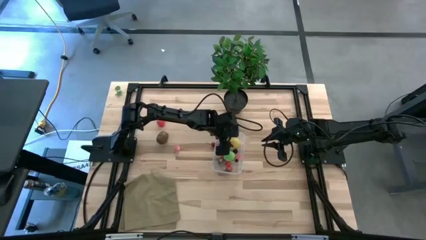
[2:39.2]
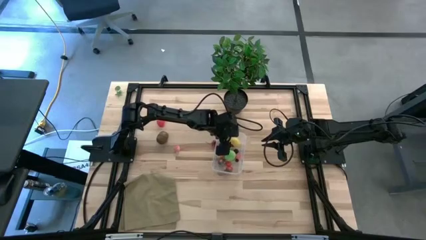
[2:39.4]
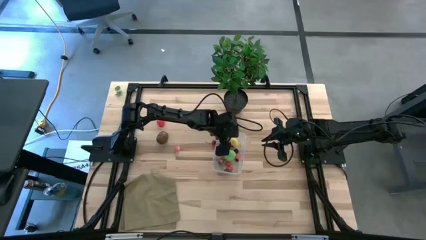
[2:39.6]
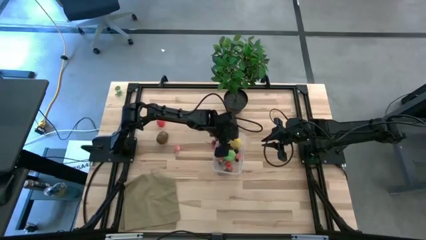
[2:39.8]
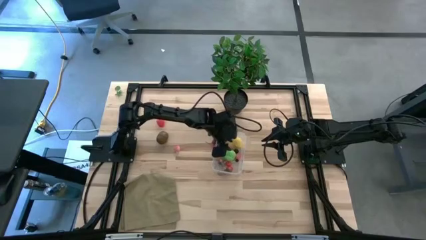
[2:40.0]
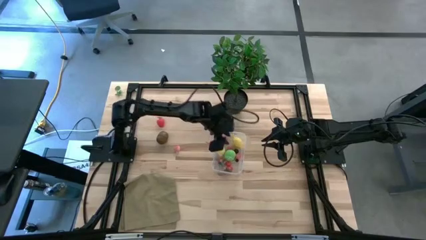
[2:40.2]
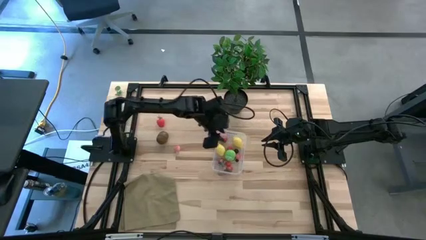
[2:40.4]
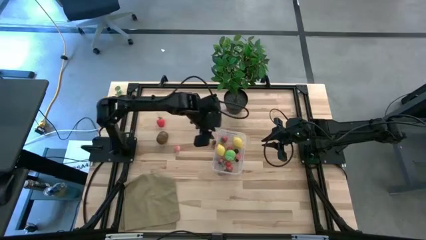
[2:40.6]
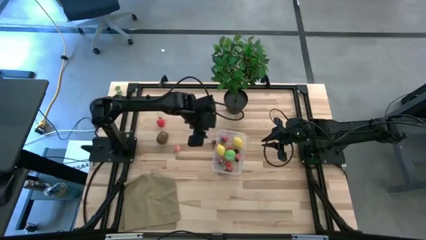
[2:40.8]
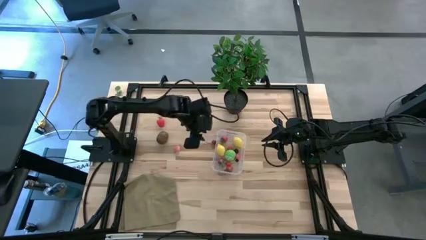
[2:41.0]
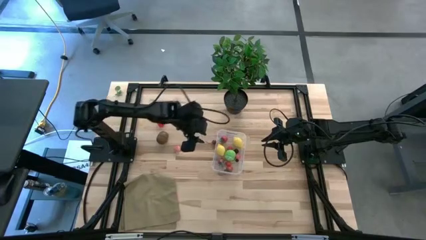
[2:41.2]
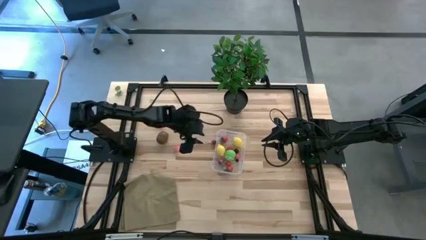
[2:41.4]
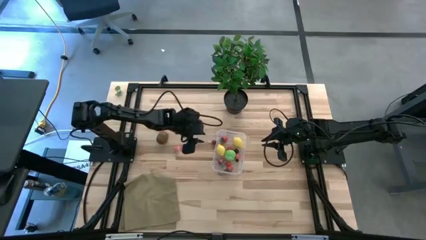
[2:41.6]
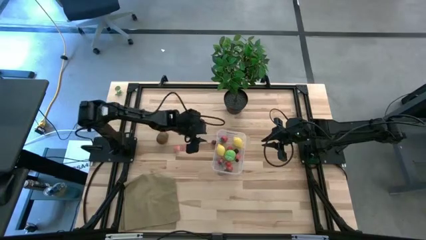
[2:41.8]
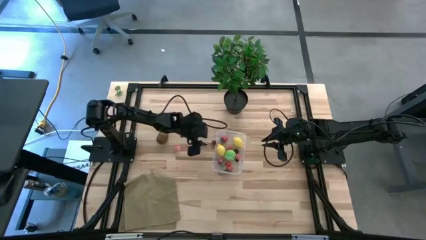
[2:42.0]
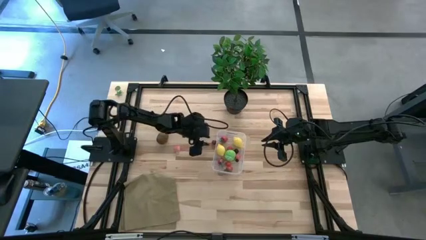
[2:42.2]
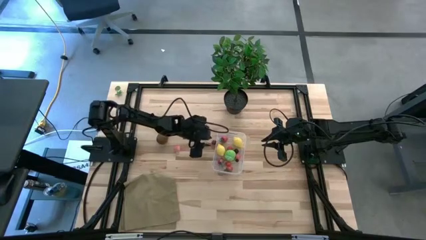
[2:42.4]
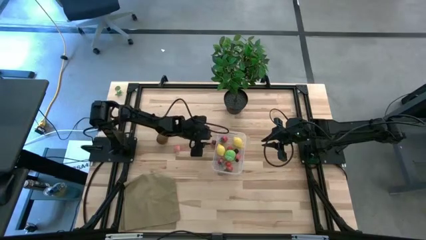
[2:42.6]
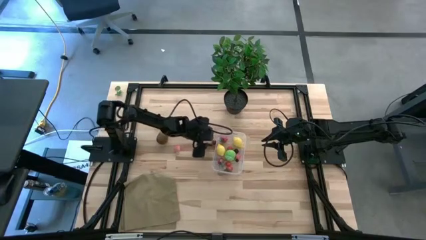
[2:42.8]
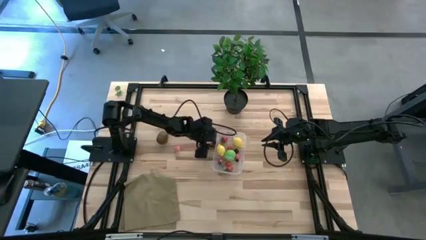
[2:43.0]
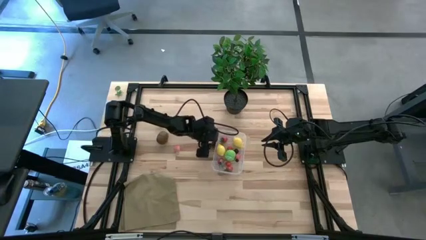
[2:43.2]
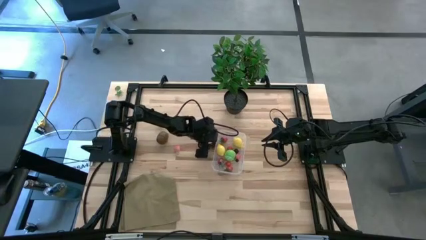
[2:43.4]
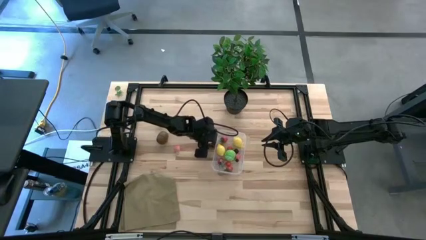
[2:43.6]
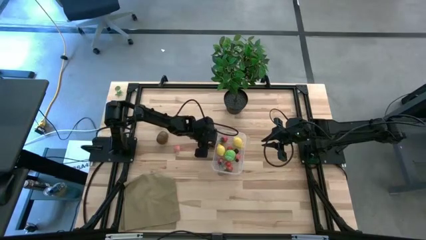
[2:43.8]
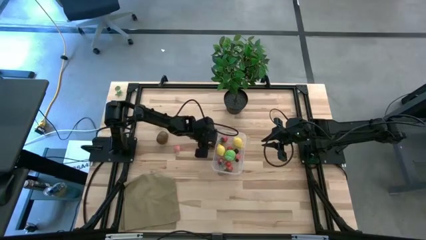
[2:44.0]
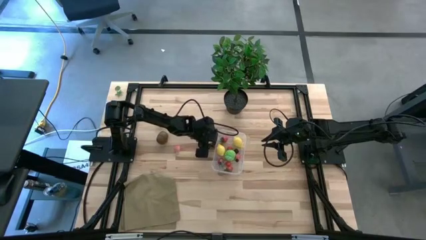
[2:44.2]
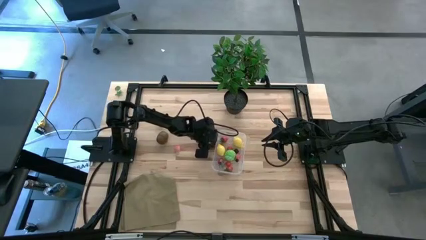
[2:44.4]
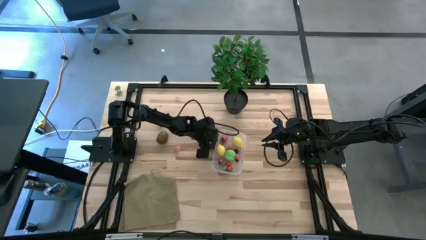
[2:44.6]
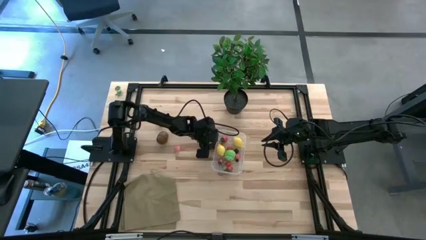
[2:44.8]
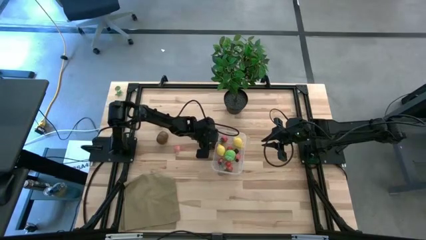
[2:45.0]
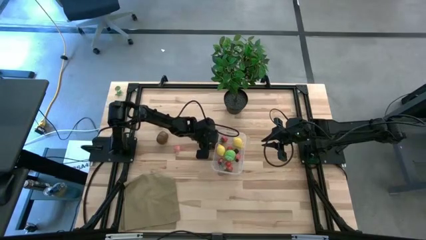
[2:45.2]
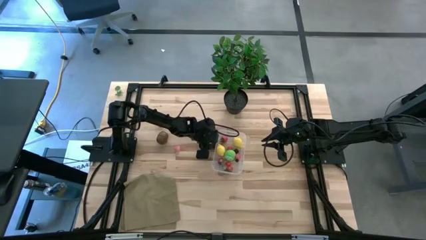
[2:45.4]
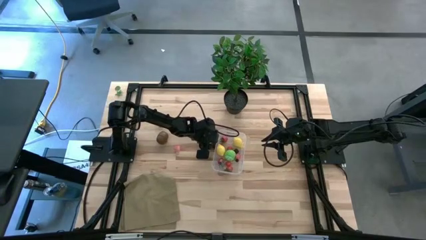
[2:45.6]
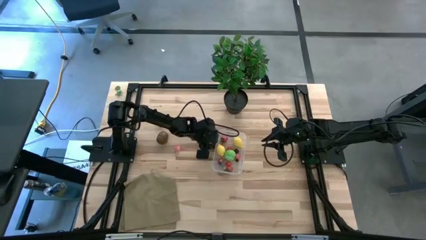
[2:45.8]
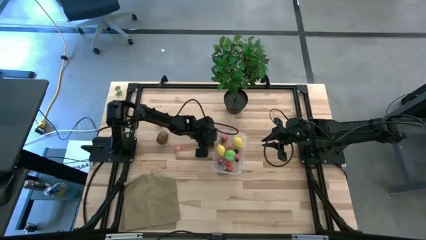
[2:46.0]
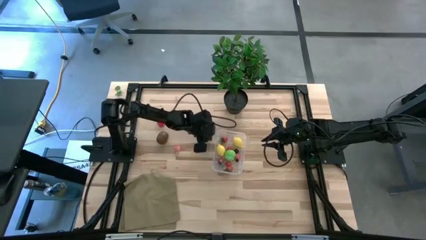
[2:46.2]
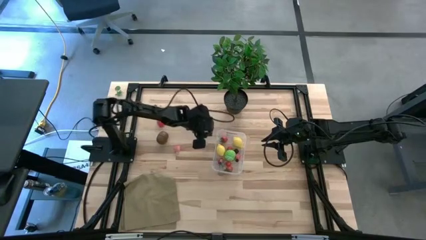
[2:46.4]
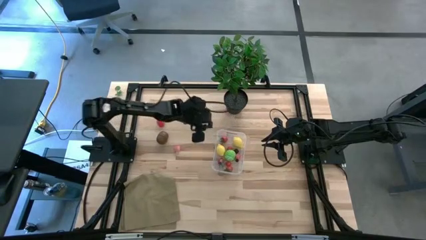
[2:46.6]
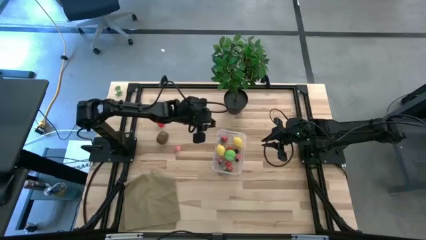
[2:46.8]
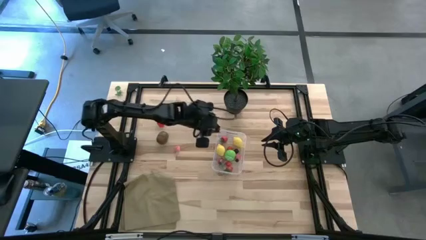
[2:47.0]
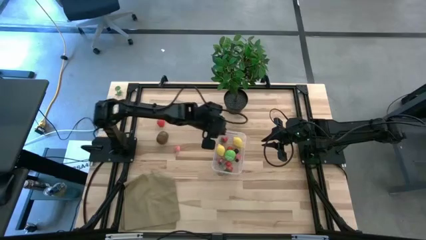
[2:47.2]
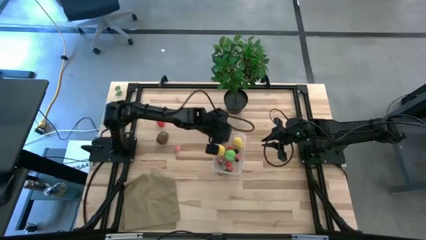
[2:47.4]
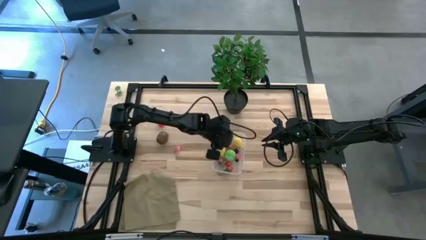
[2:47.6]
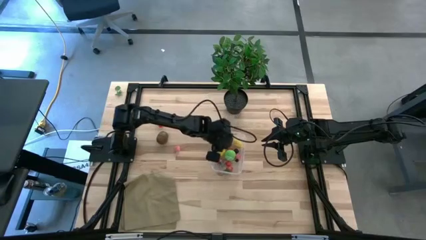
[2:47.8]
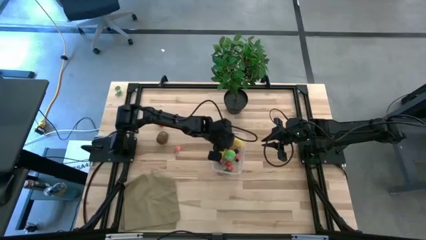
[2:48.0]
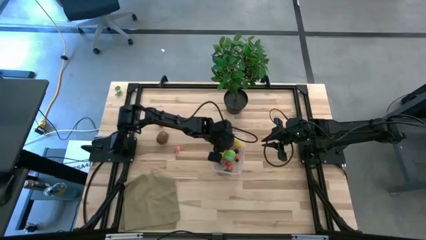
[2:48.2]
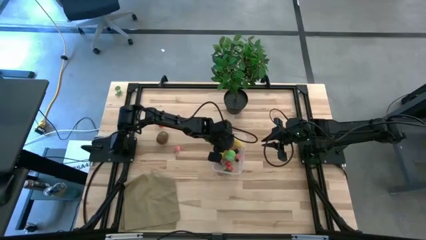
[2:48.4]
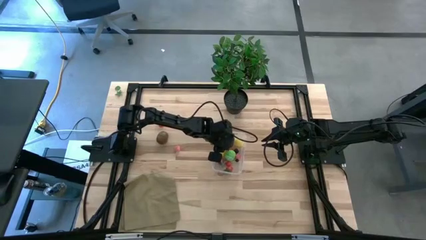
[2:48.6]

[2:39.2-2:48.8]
Task: Pick and placing Produce into tupperware
Put the red cherry into the transparent container

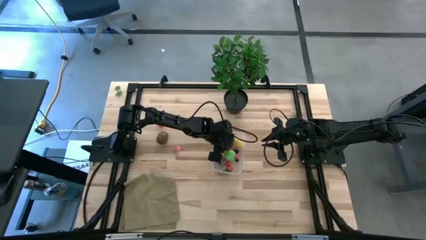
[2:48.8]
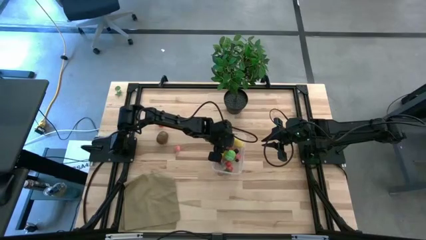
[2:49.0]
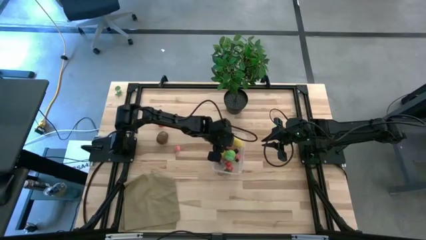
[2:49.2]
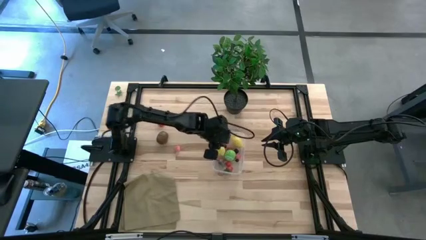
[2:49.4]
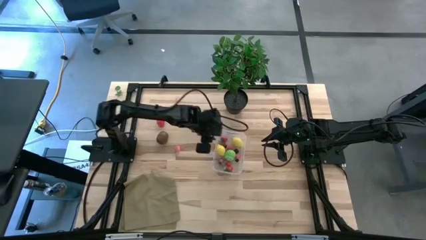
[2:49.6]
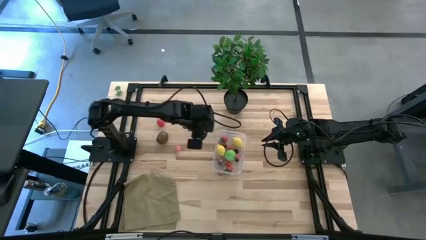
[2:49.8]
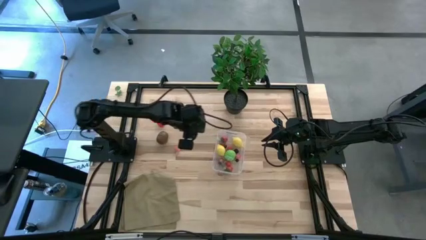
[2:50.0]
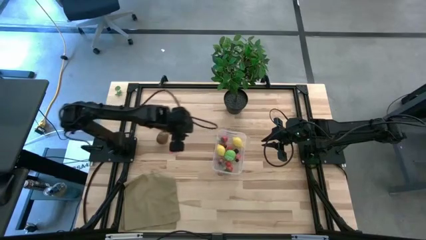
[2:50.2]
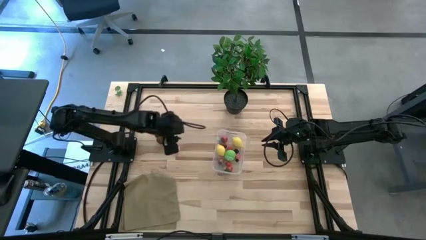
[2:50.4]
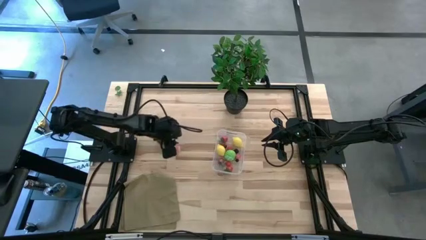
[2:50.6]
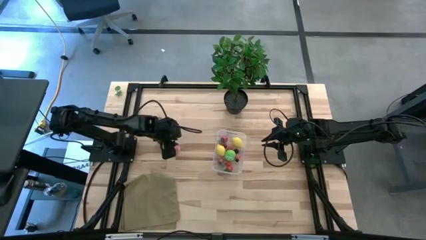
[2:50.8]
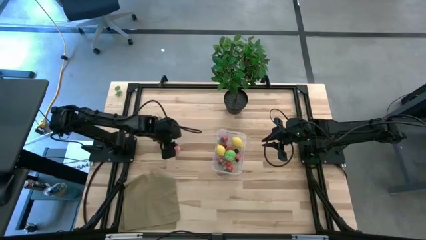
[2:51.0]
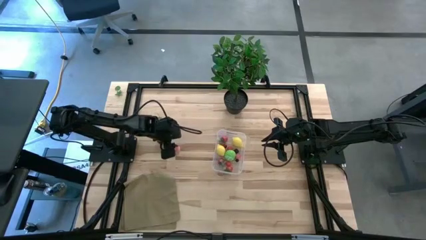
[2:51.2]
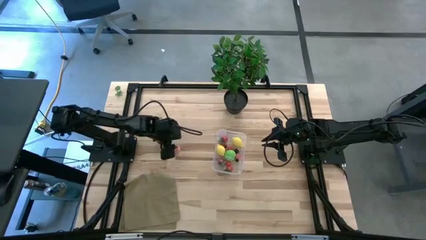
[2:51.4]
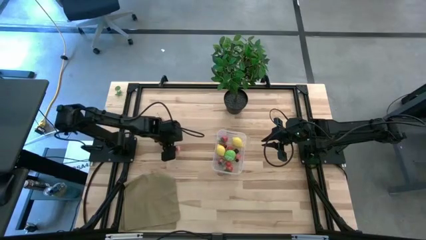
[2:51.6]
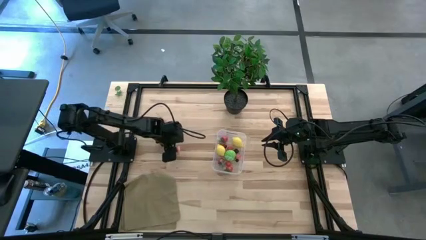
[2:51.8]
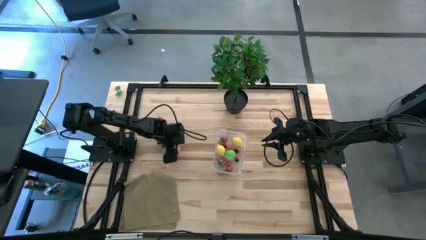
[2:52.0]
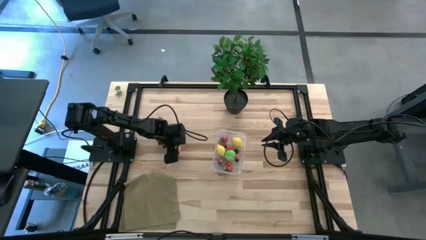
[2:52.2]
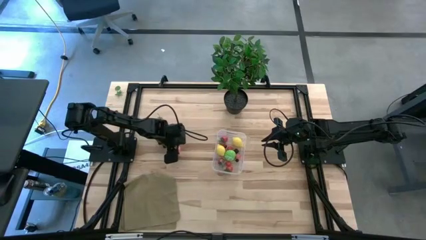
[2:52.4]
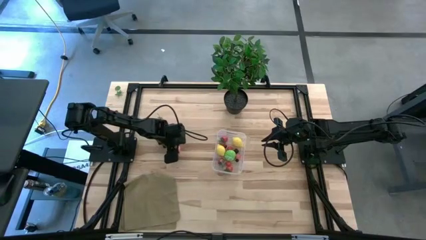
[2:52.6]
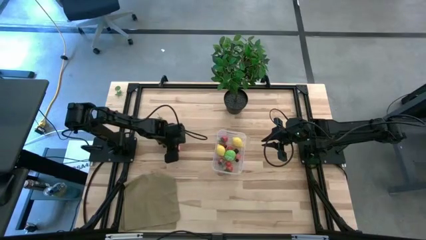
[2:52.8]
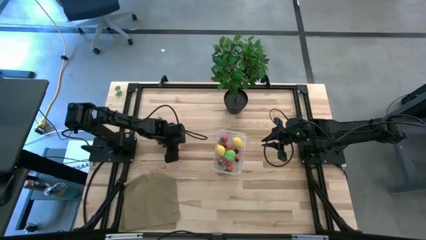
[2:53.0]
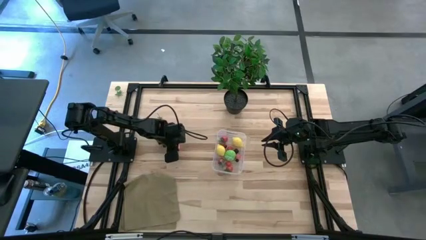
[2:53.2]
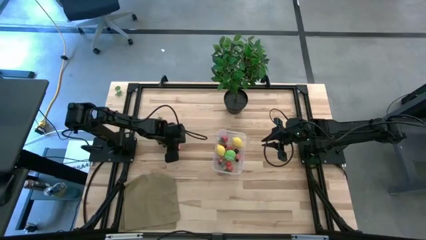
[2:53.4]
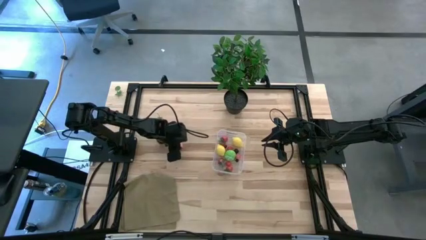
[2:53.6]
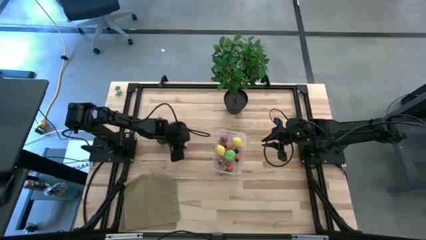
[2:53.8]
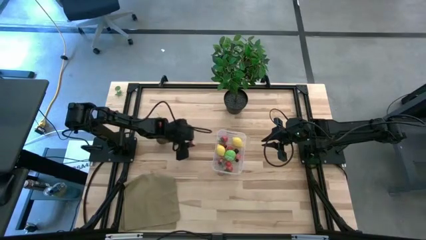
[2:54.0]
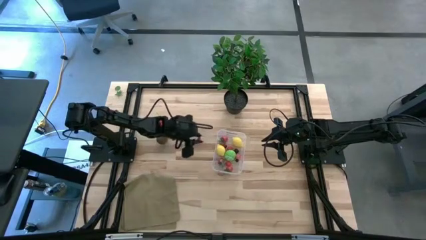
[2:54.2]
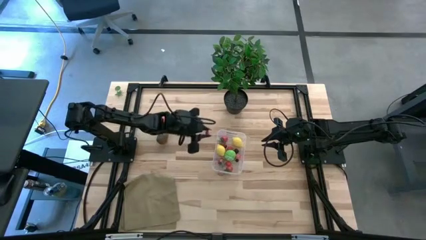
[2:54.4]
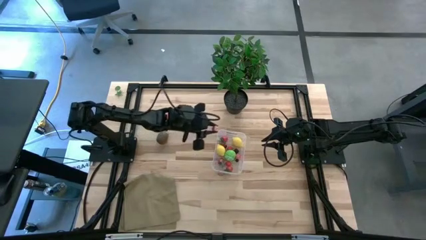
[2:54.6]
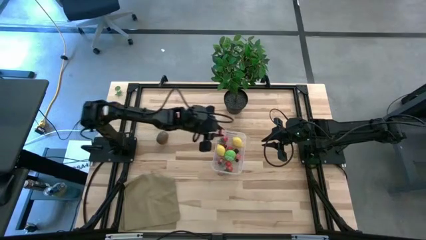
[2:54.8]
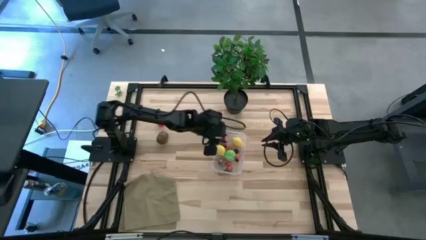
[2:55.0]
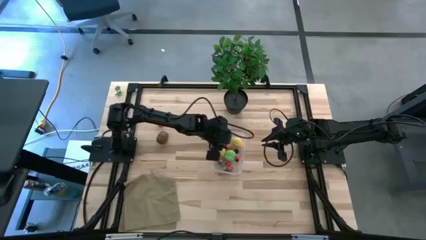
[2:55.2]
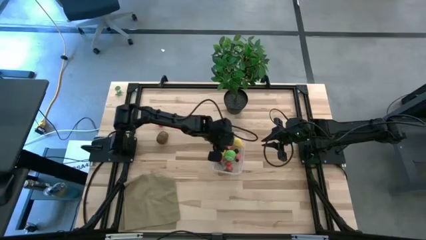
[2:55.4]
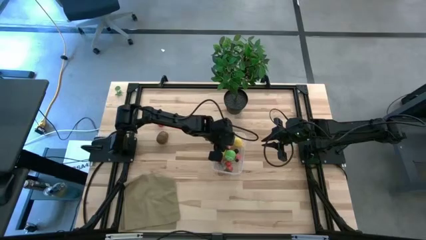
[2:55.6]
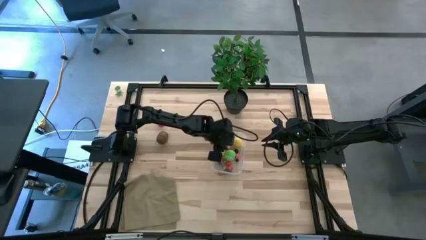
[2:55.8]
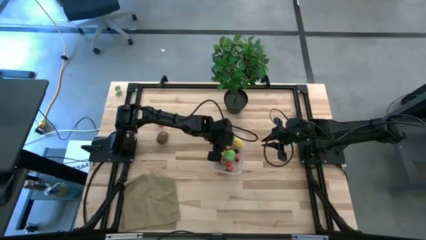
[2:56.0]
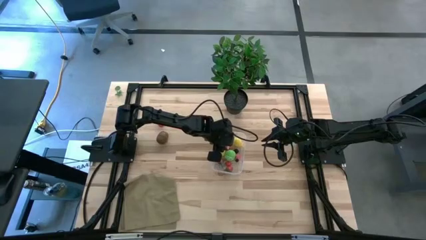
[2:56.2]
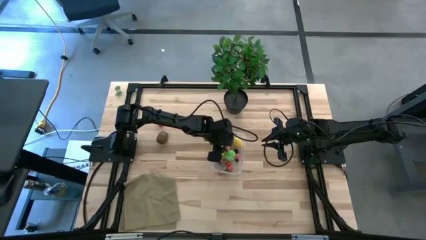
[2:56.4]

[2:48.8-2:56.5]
Put the pink peach into the transparent container
